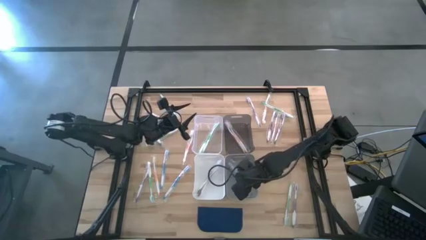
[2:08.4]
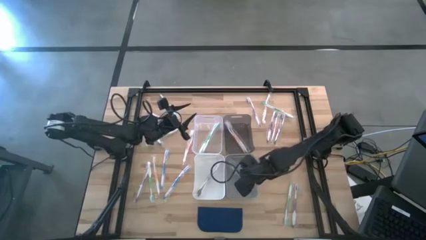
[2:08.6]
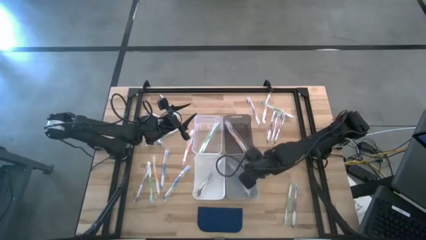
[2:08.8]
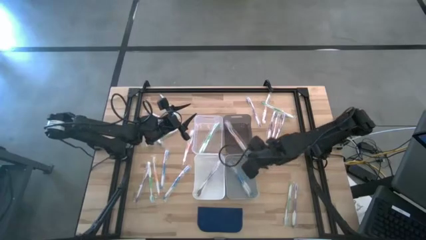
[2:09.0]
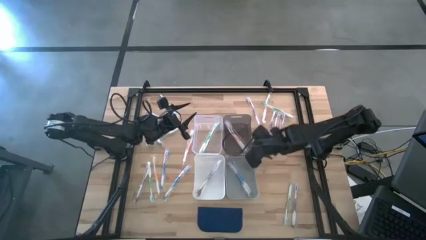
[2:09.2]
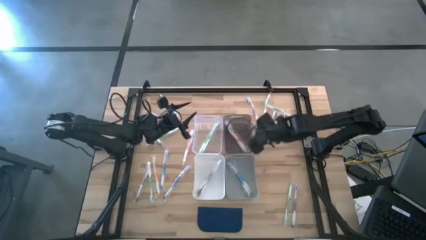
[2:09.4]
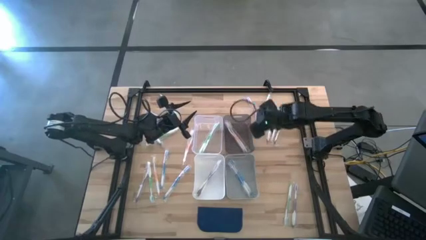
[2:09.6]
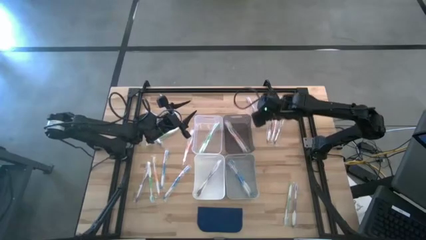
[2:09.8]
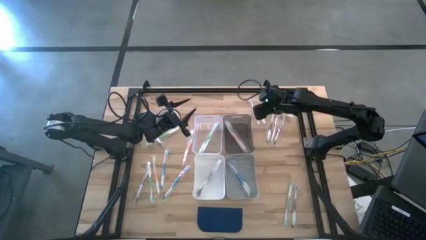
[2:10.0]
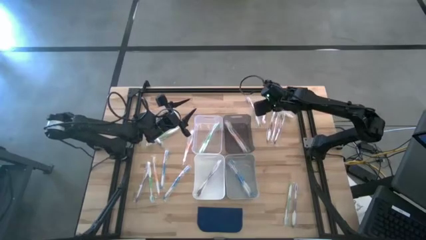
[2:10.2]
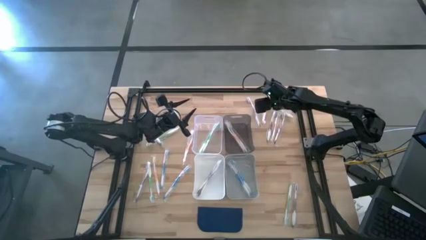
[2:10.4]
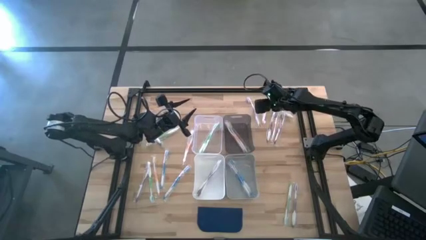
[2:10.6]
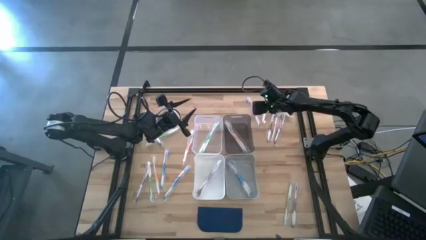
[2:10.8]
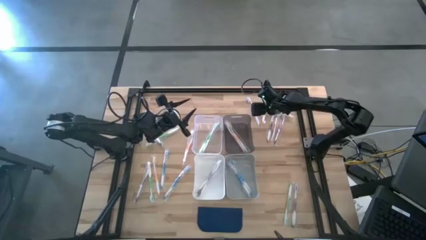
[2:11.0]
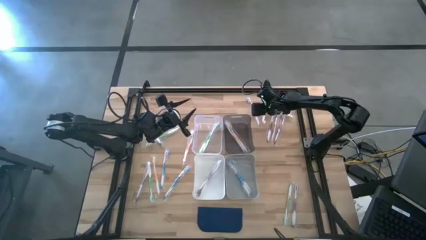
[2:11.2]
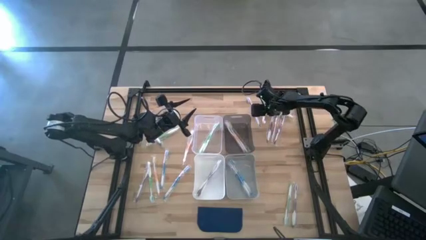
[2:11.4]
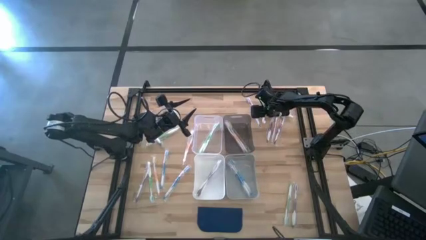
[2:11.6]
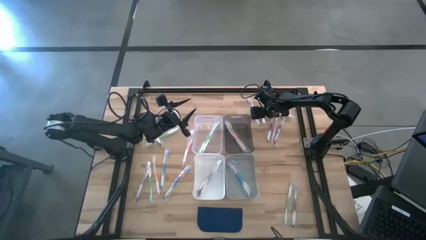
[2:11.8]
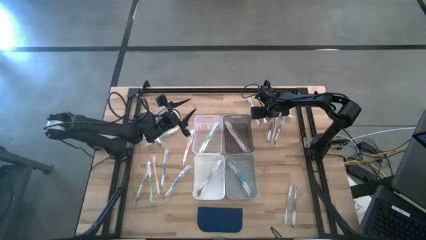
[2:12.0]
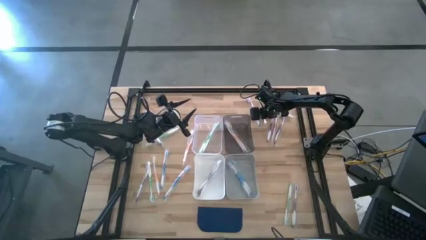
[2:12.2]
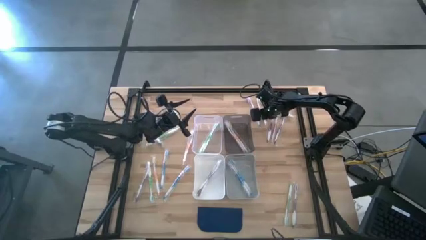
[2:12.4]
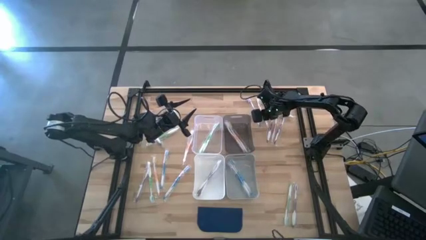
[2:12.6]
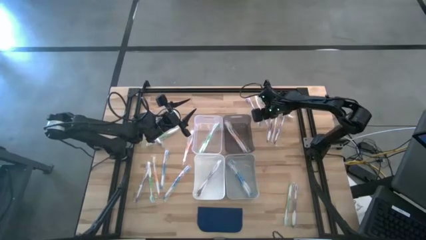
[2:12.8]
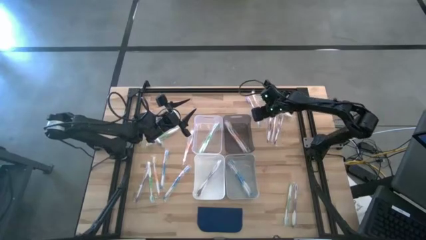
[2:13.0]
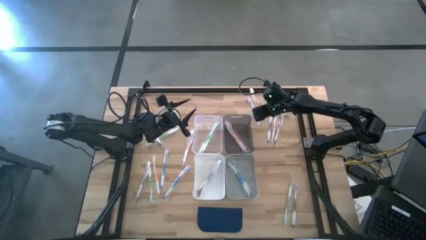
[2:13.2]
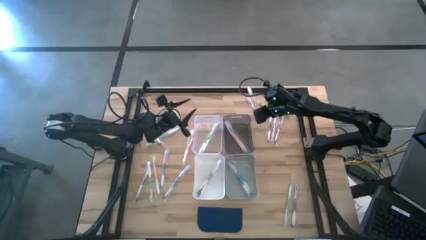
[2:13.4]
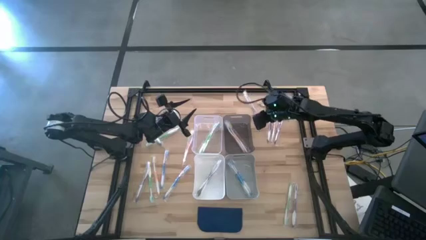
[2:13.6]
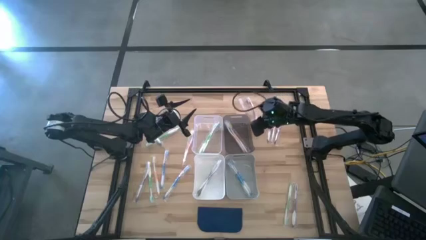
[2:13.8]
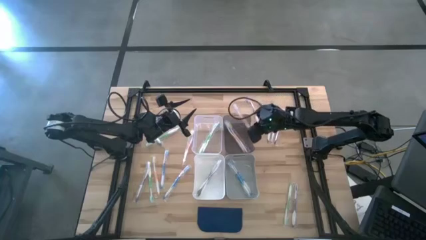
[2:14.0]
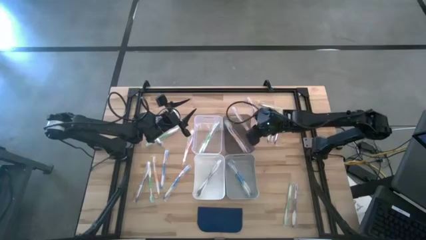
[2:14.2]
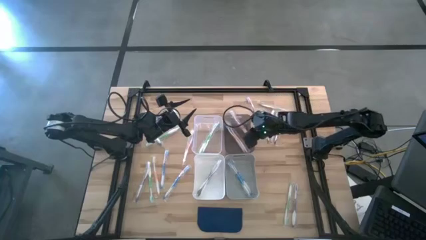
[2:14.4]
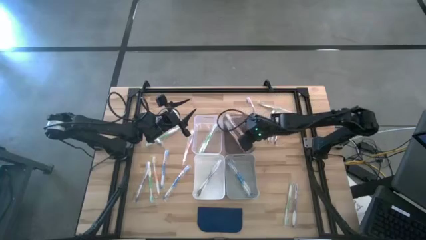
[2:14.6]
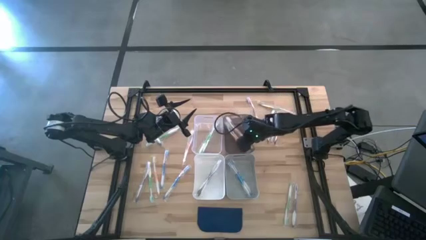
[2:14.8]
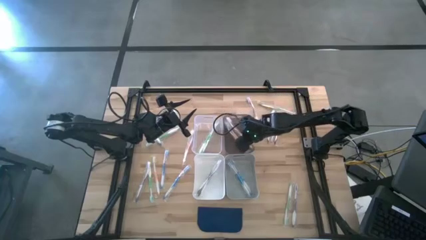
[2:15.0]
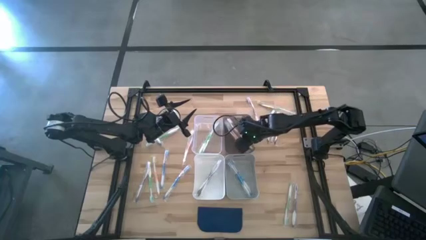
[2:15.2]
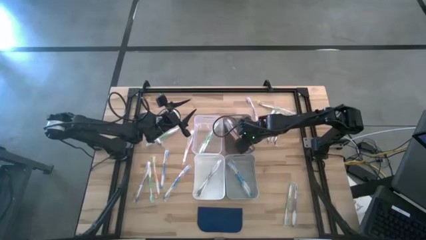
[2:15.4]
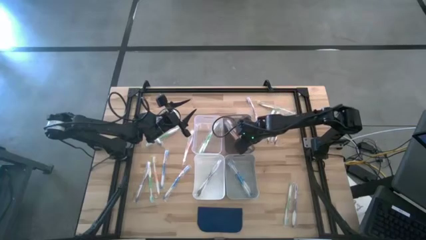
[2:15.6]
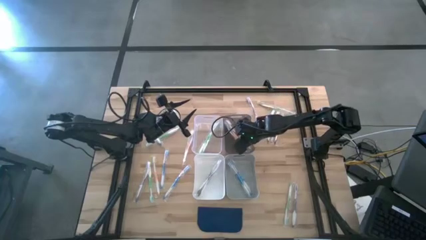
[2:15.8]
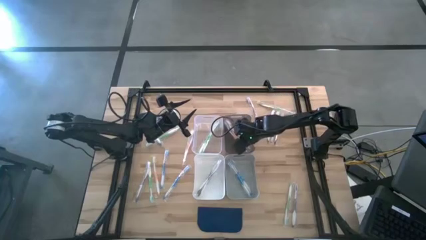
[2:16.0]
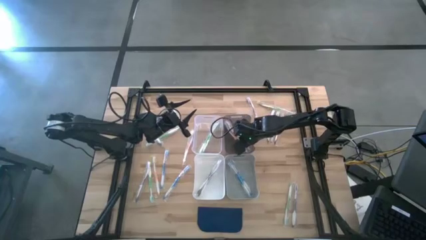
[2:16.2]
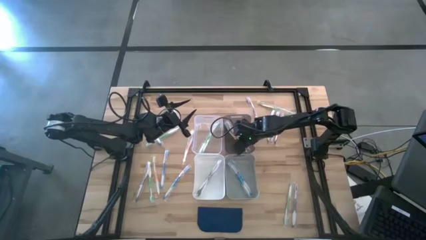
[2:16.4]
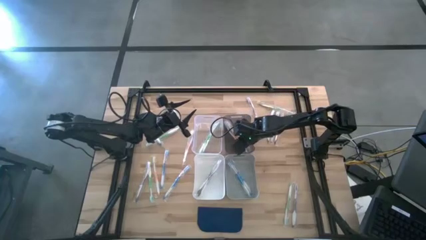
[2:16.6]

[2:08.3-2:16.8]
Task: Pick & Place Toothbrushes
Put the orange toothbrush into the black bin

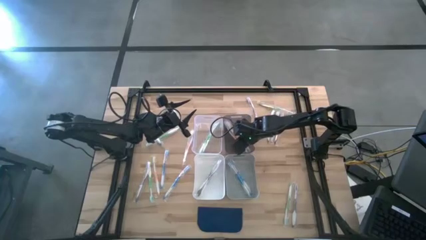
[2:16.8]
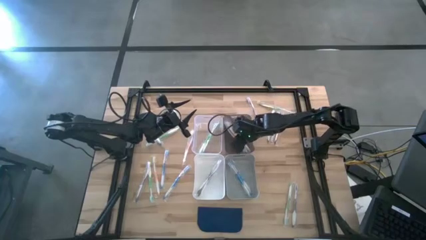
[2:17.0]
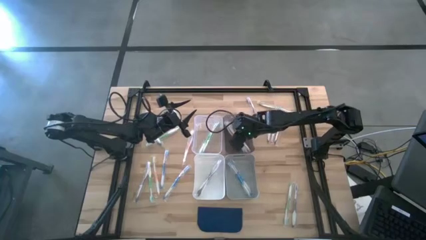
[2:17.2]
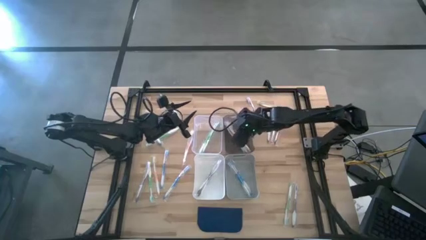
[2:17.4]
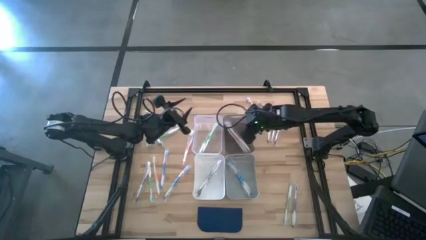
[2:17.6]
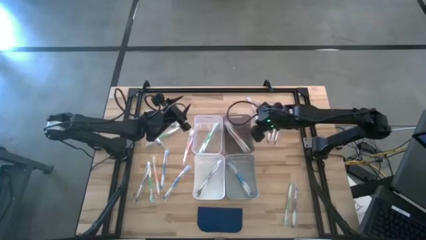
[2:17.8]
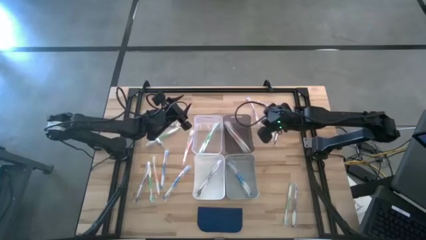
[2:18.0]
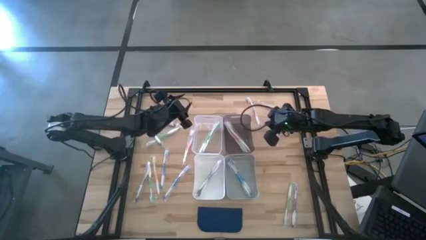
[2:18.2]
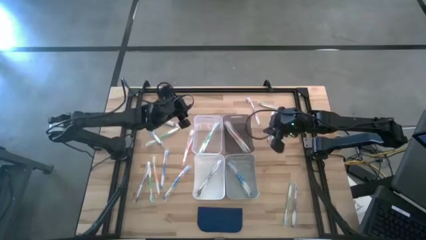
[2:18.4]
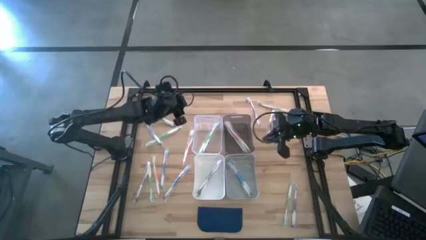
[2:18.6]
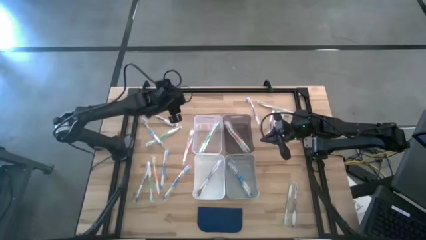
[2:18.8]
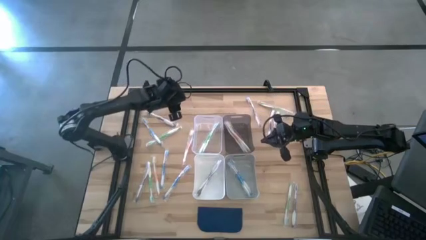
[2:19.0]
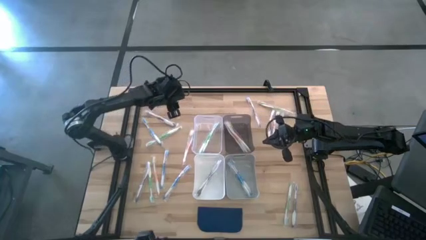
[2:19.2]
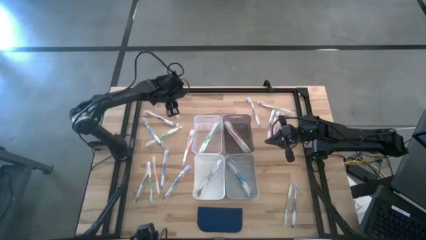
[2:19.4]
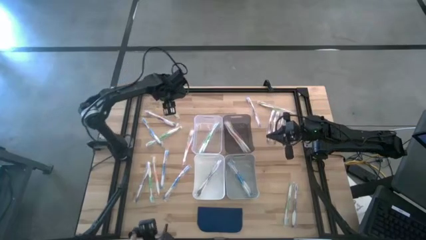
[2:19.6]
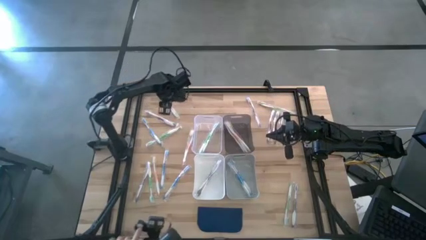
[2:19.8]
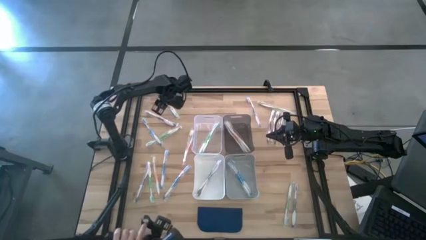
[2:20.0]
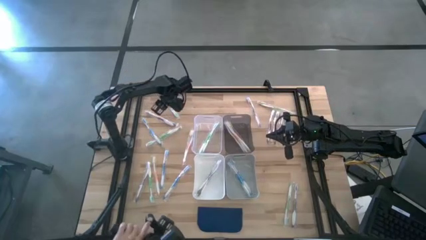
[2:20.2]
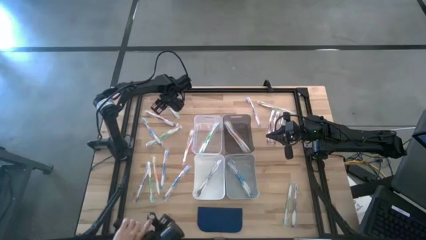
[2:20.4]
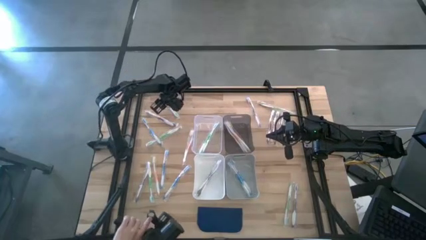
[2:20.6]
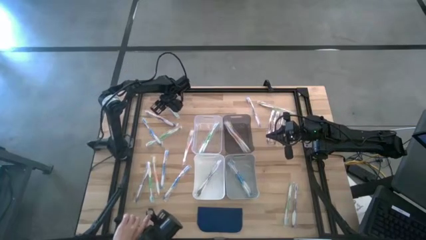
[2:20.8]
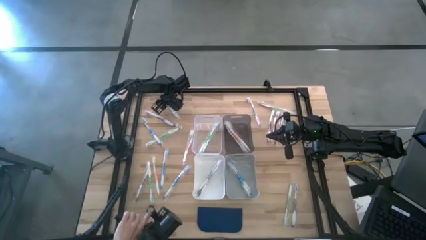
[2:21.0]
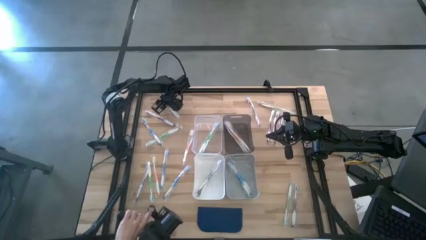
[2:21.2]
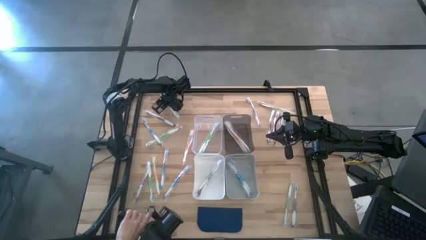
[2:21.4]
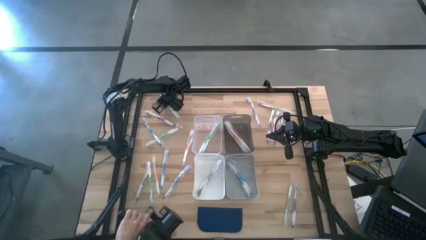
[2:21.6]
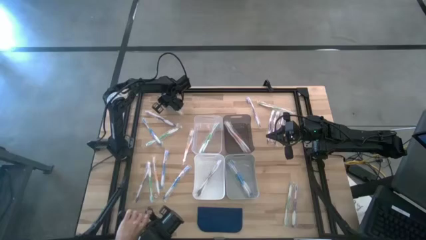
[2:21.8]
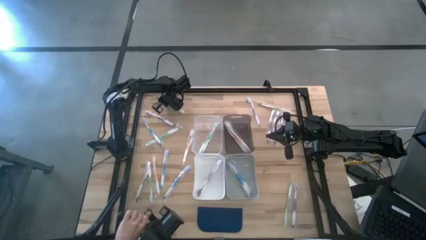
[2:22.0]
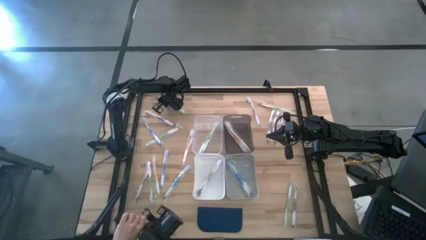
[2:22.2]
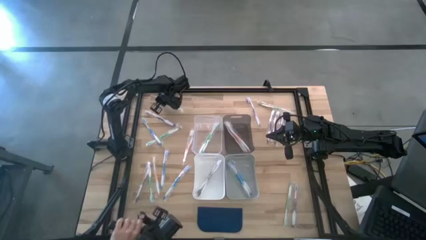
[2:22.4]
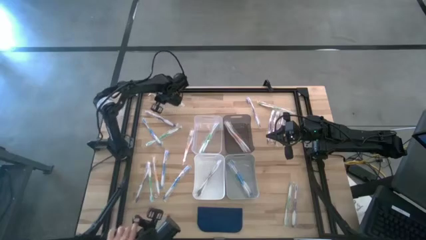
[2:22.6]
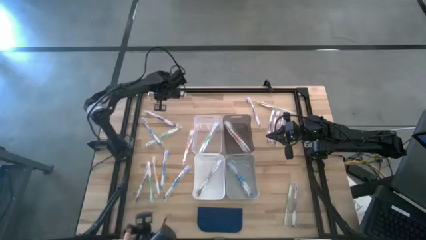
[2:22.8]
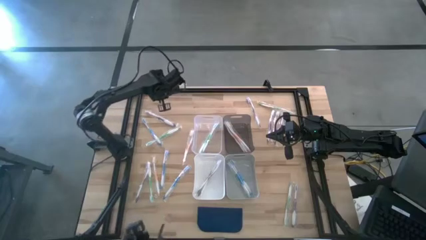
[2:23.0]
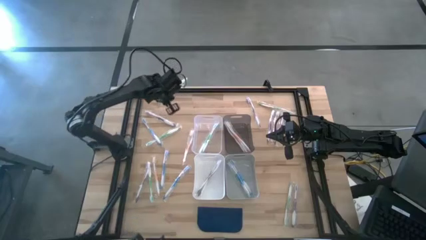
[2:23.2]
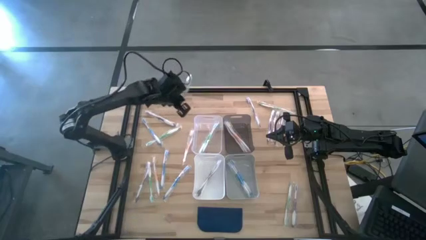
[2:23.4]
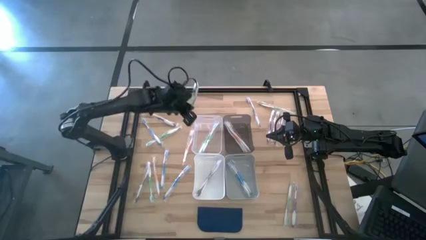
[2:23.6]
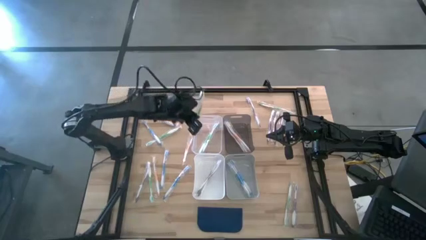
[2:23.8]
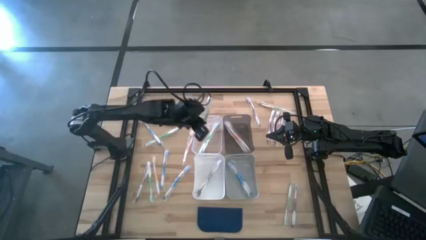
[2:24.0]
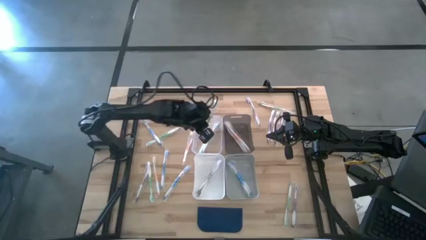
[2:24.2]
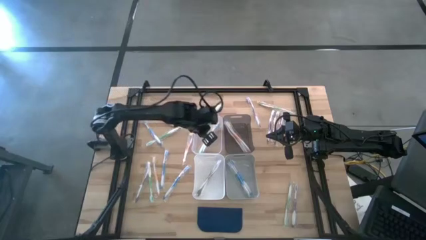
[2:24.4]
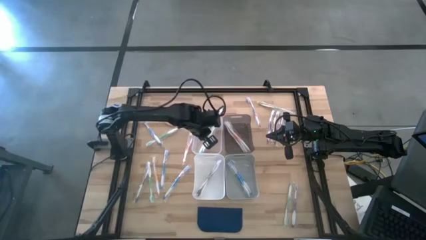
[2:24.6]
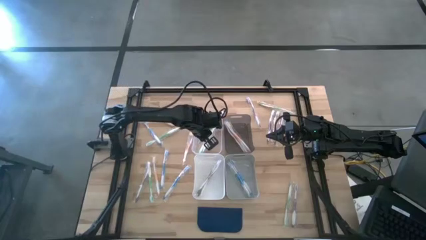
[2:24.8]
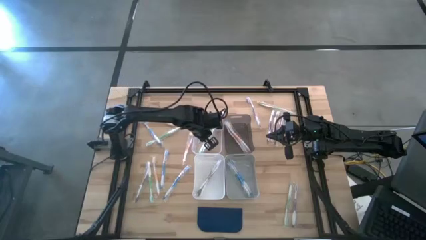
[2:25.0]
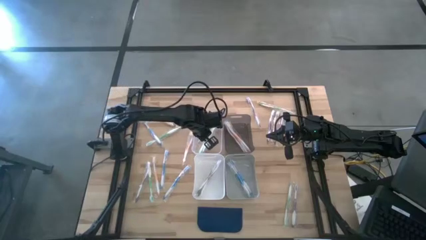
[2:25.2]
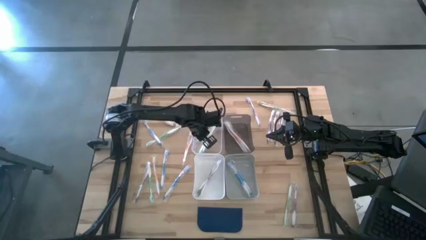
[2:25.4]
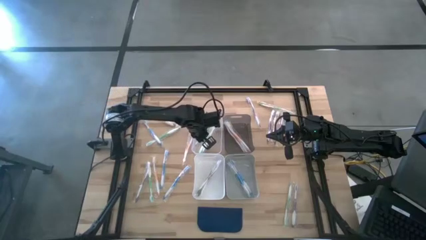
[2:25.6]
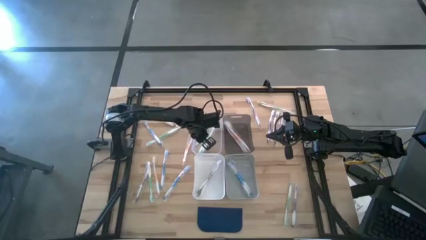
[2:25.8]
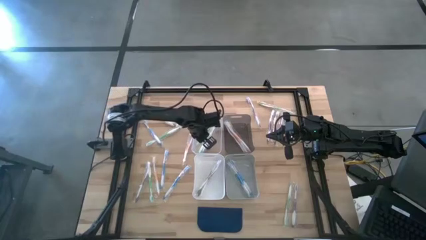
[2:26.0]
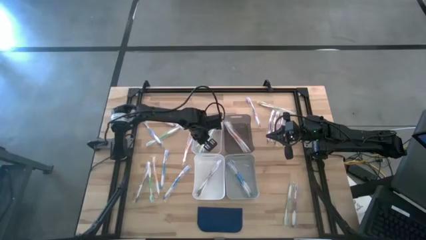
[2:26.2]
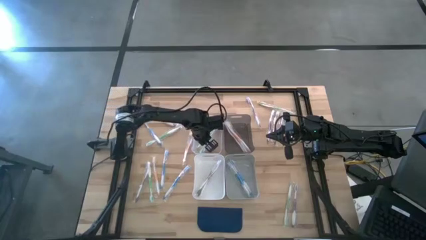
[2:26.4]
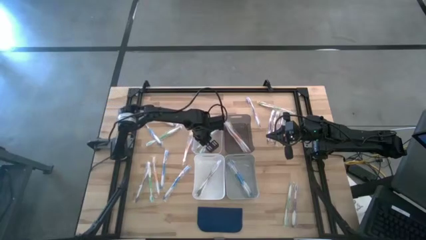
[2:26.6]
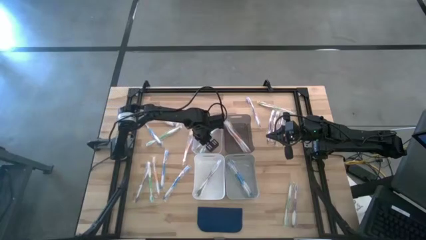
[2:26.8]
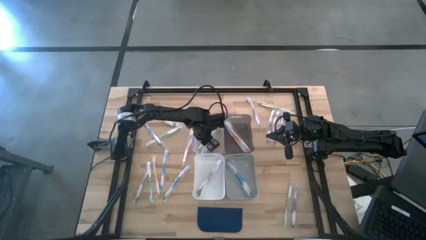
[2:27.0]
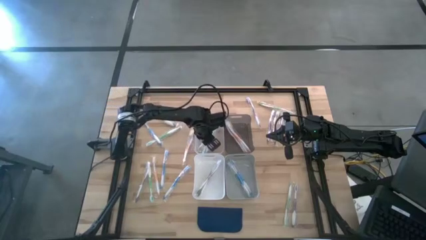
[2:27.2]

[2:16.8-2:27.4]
Put the green toothbrush into the transparent bin
